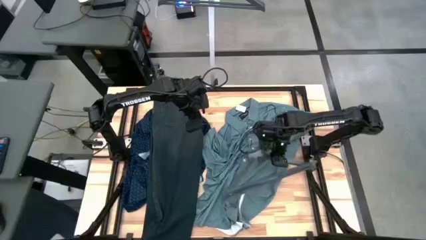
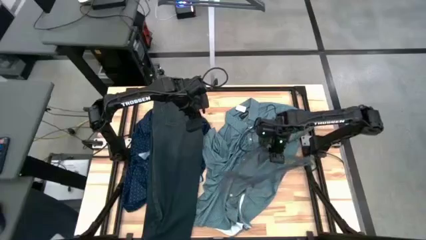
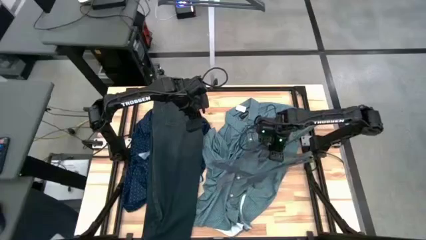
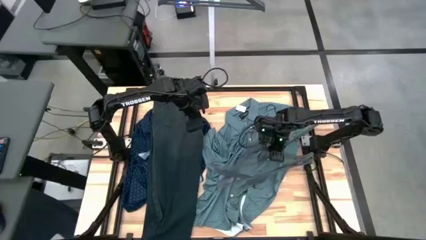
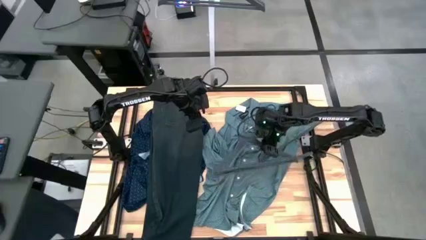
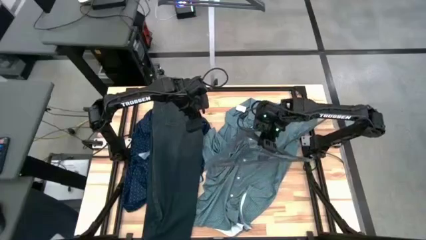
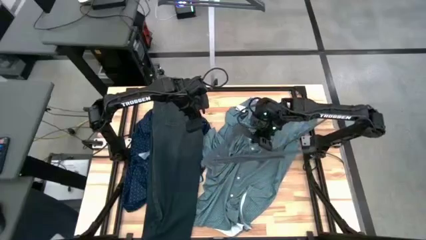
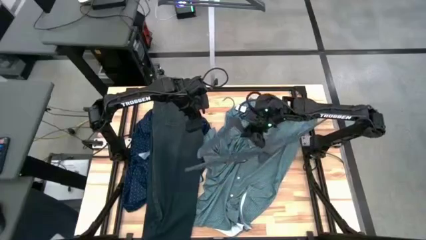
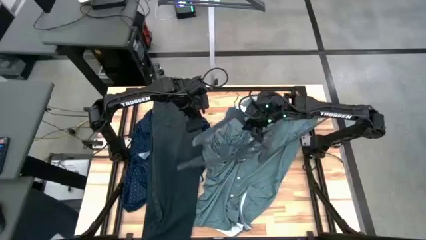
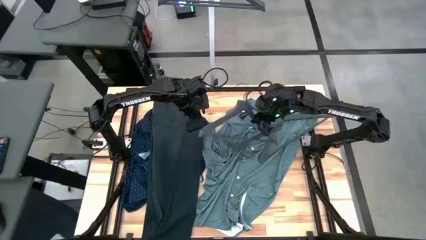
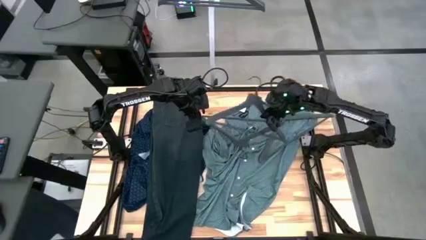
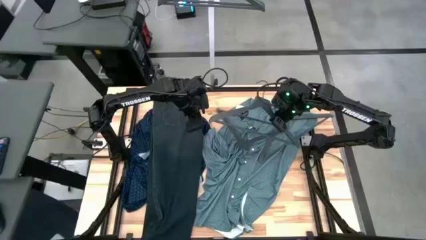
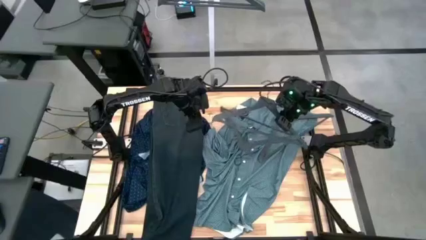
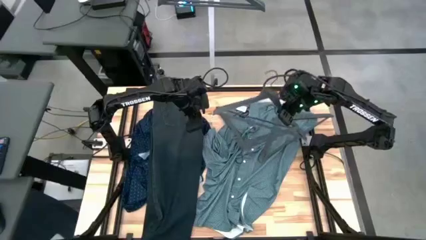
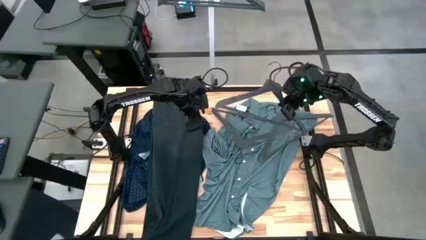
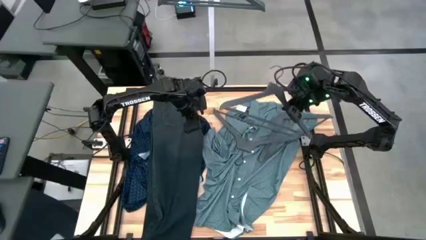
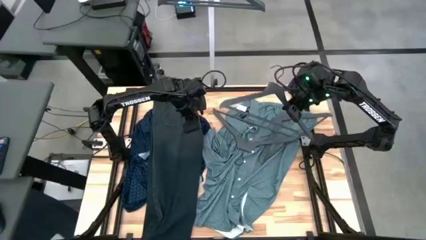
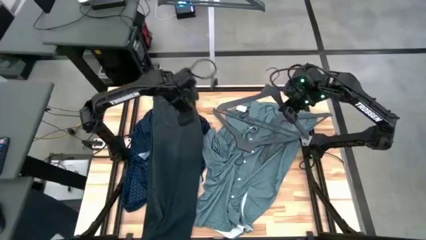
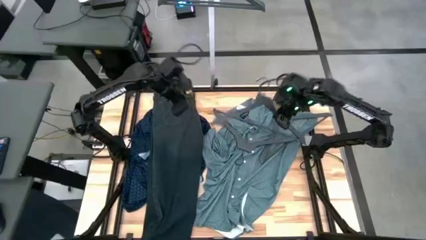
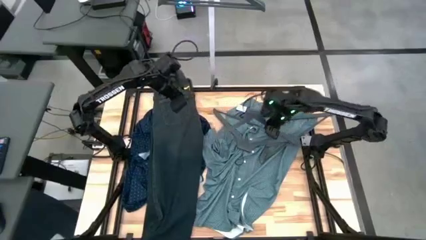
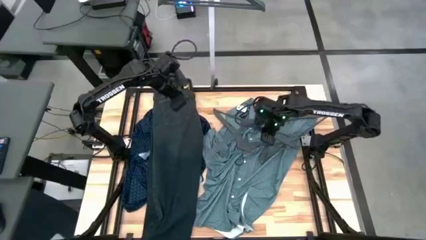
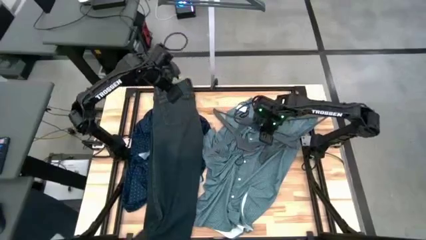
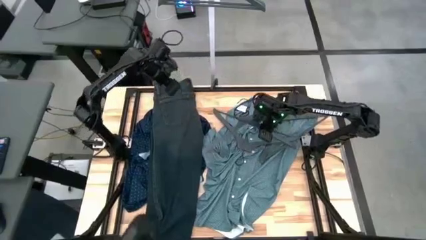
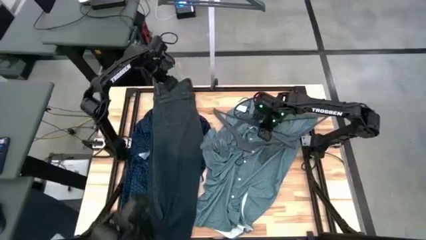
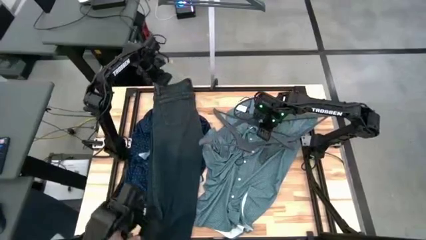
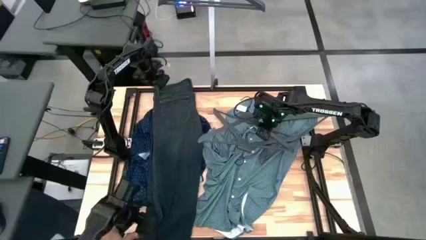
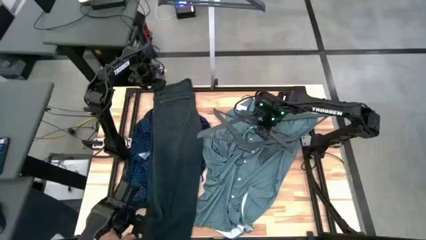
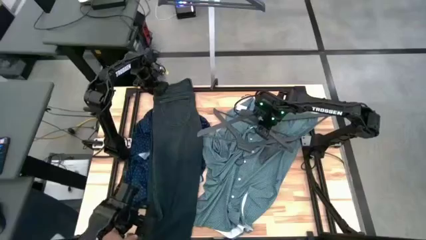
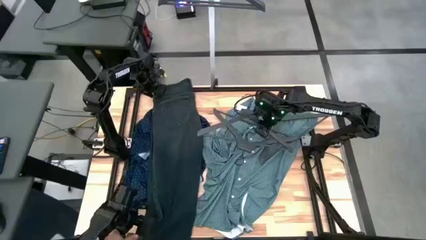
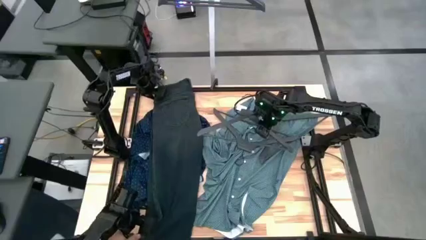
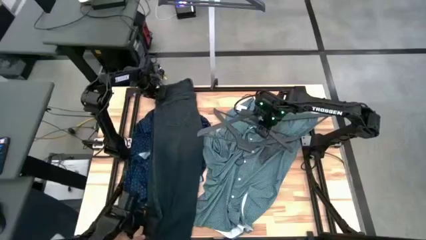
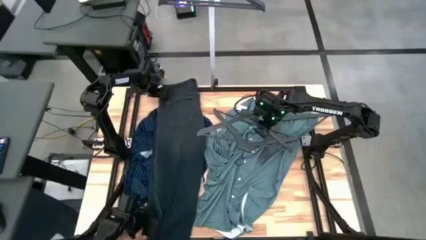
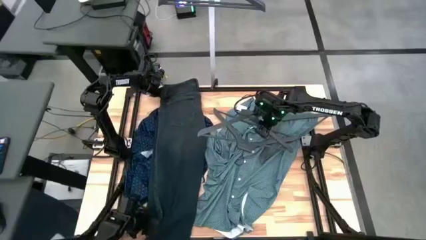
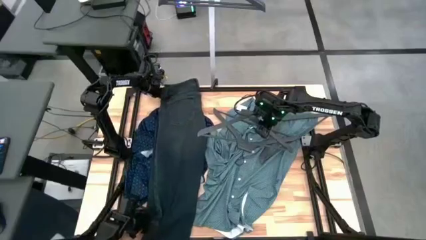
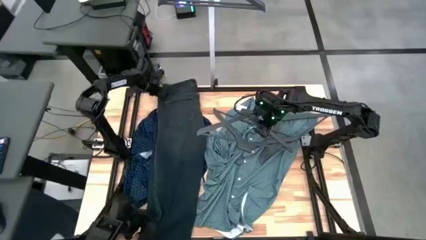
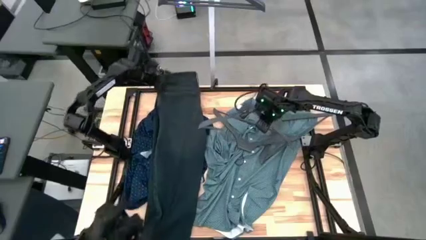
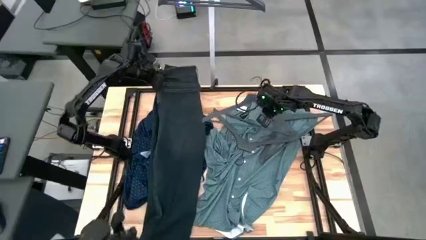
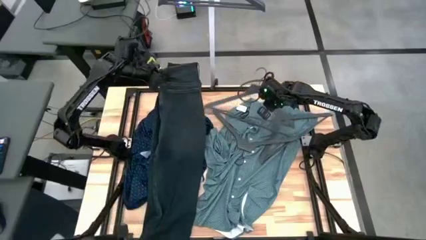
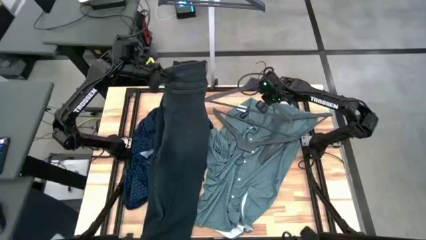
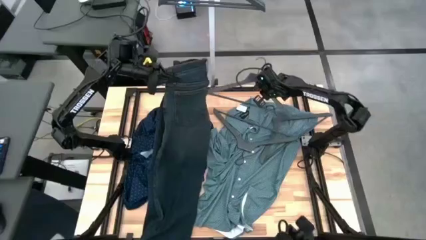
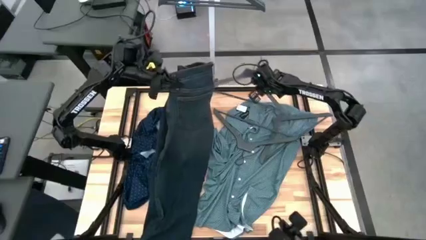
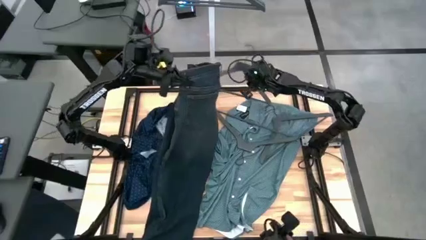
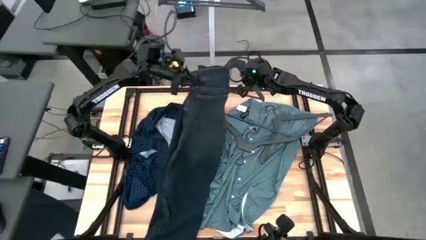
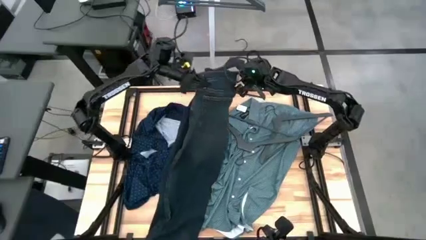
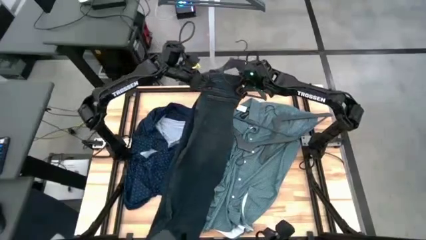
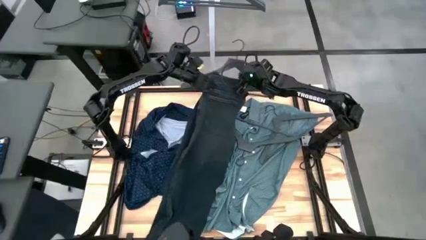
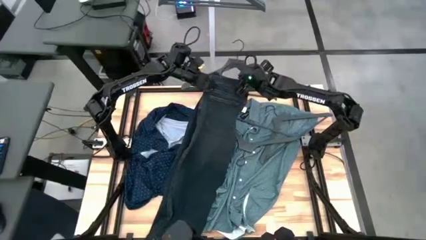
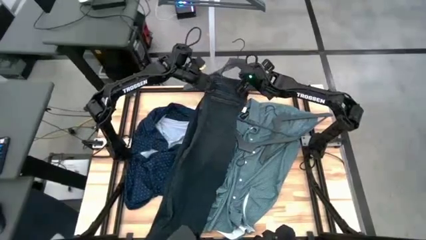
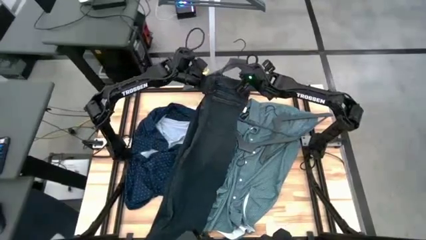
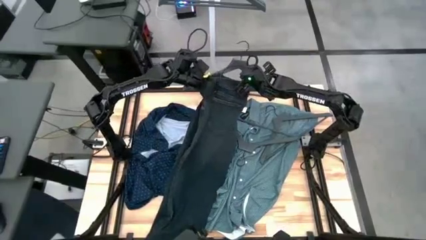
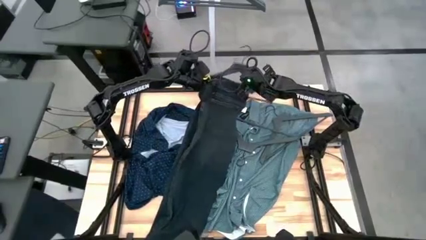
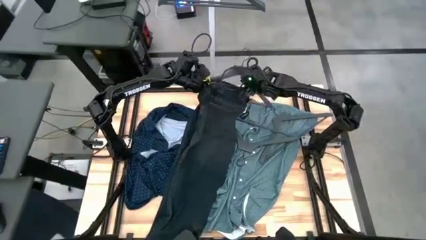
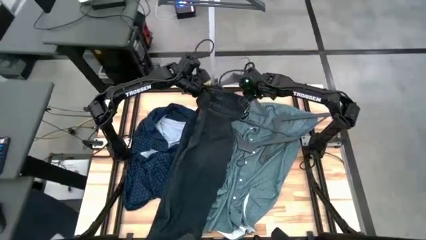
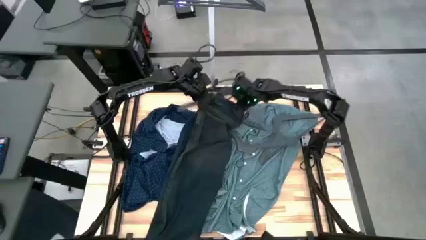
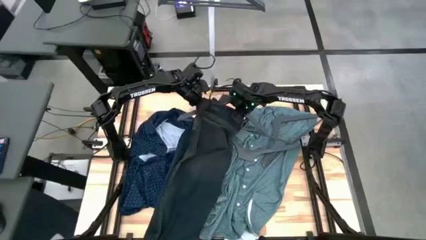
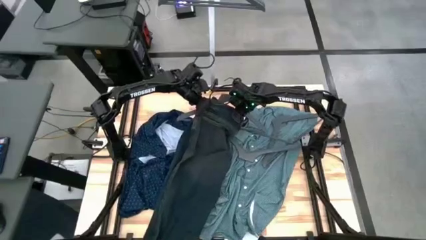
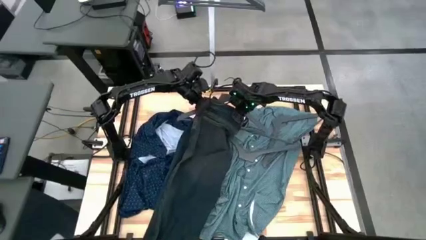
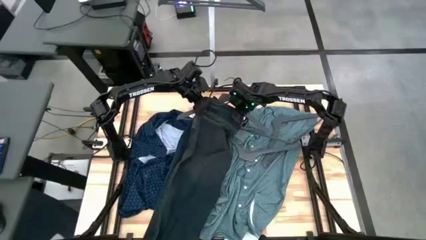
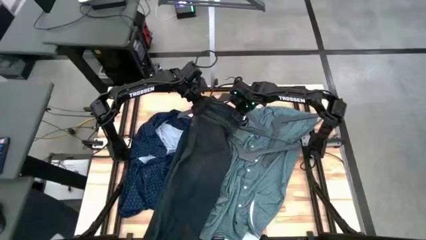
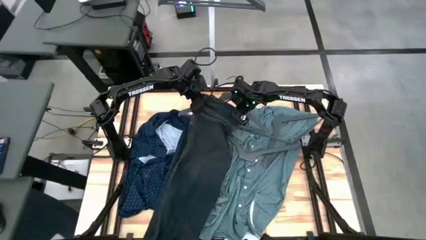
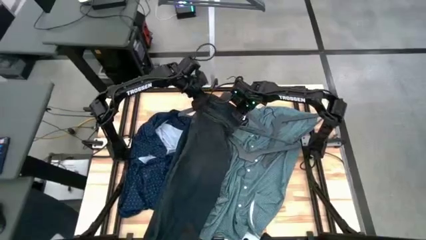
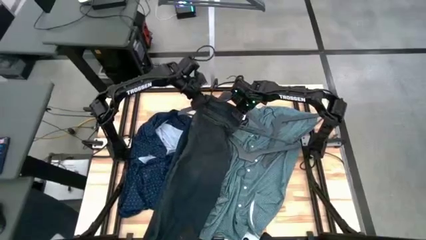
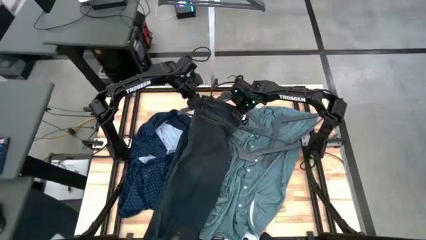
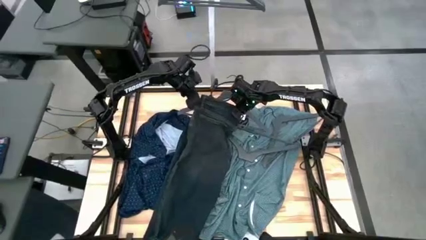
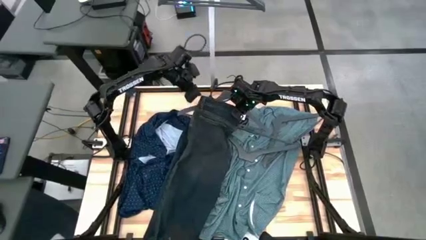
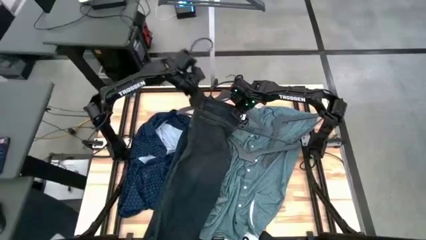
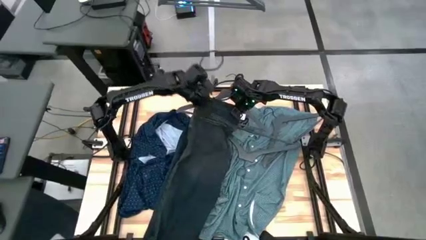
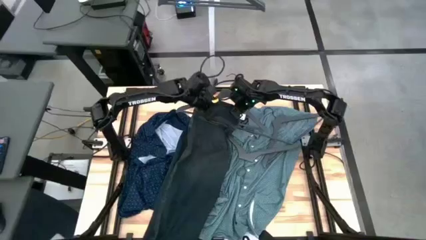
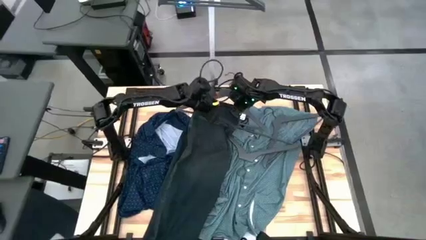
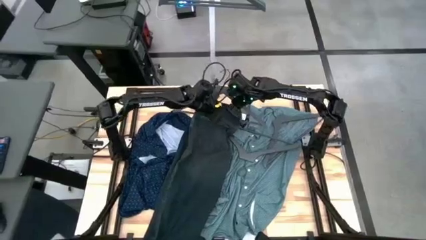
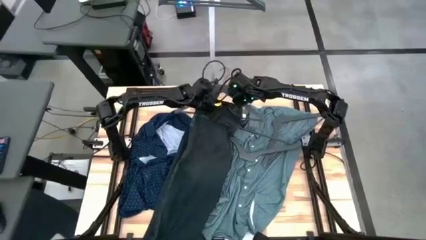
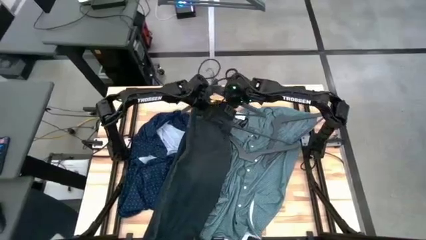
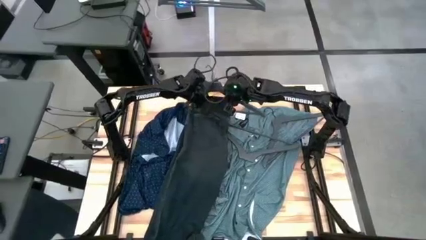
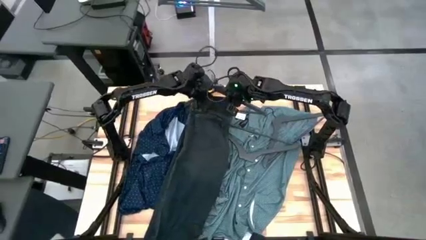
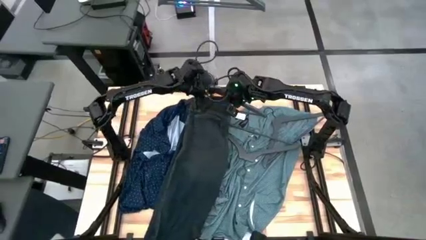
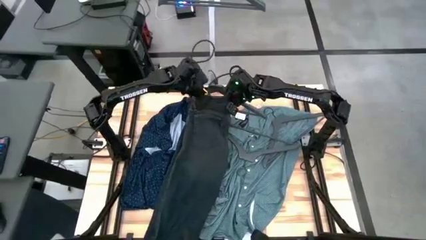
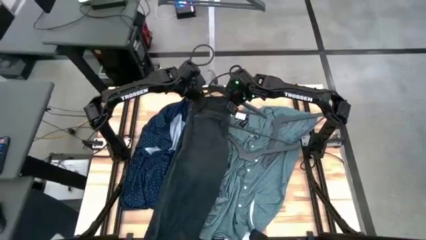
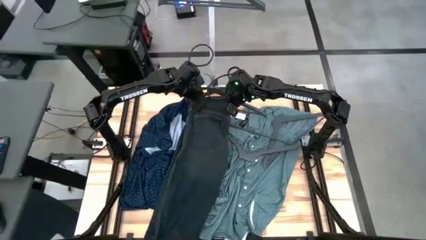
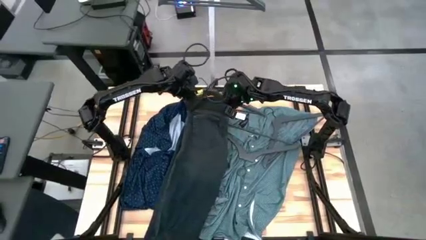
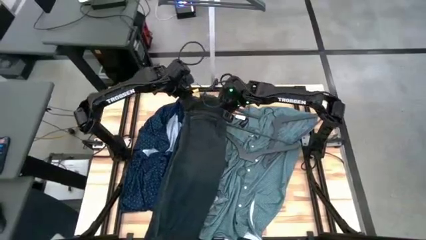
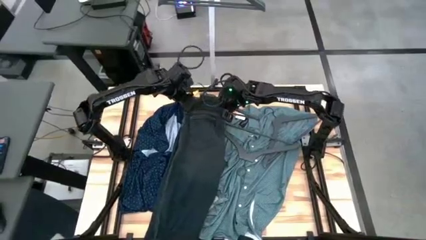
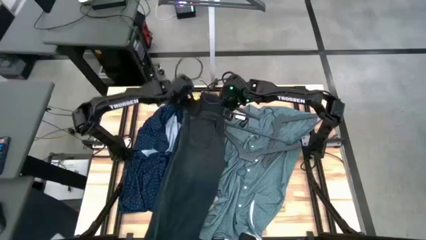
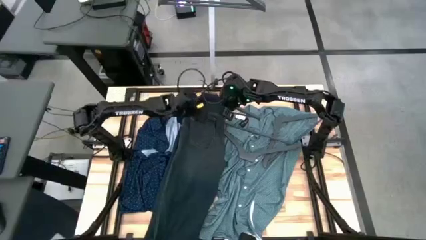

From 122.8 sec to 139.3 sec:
Task: Hang clothes
Hang the black pants on the rack
